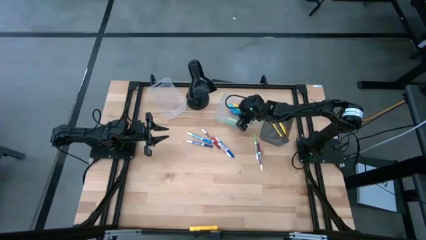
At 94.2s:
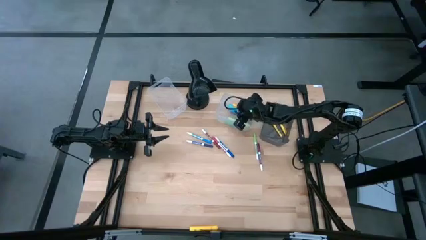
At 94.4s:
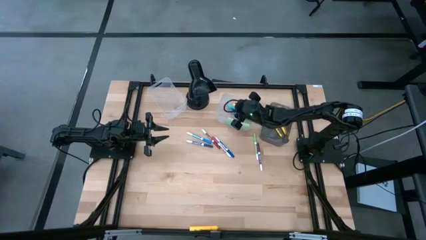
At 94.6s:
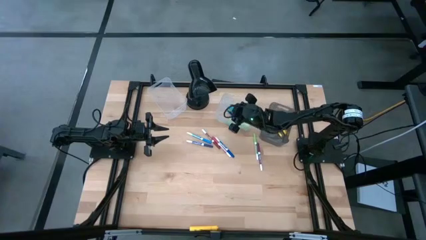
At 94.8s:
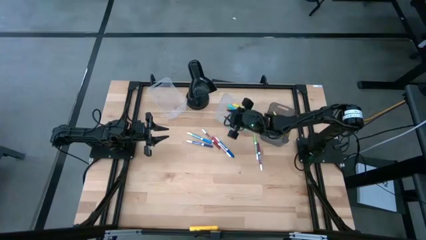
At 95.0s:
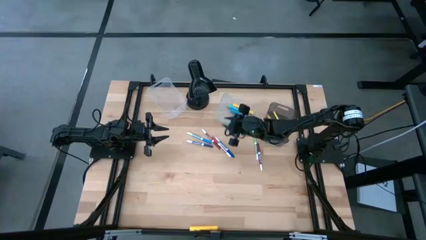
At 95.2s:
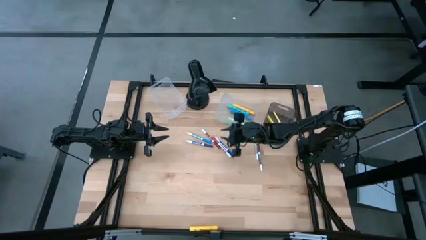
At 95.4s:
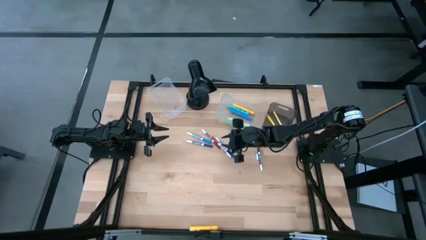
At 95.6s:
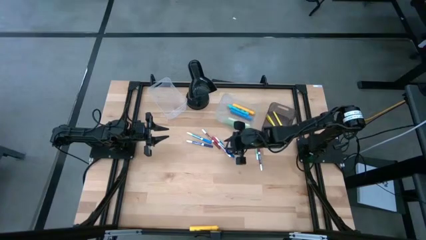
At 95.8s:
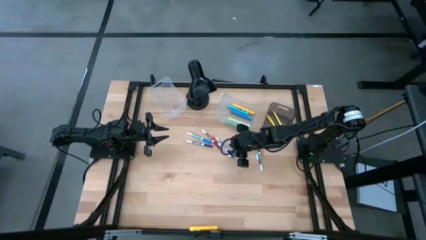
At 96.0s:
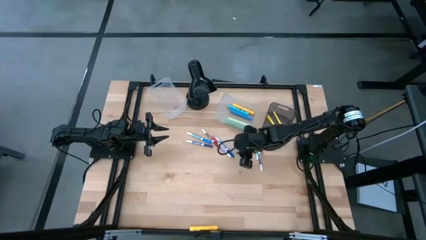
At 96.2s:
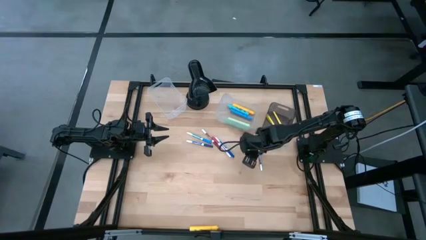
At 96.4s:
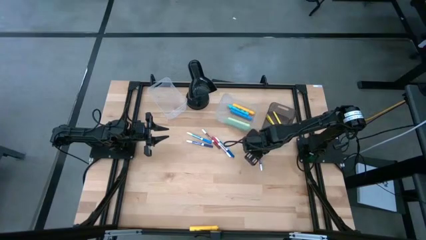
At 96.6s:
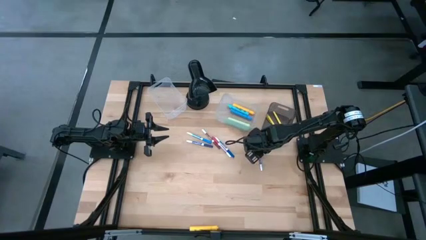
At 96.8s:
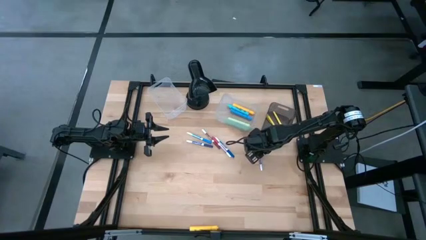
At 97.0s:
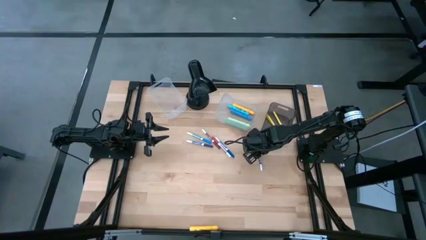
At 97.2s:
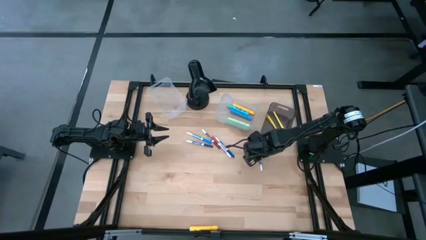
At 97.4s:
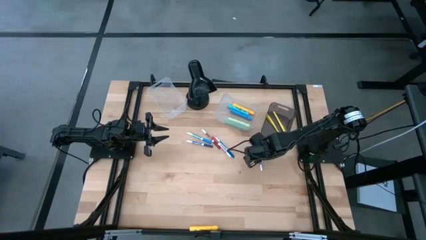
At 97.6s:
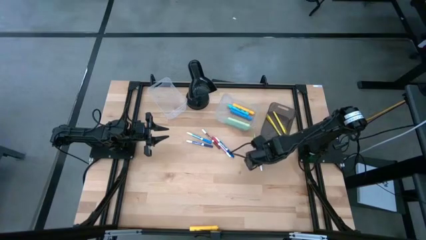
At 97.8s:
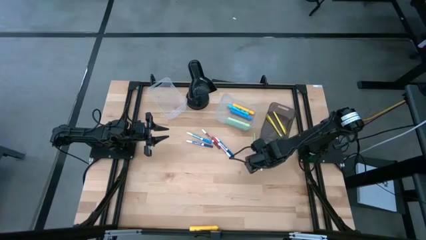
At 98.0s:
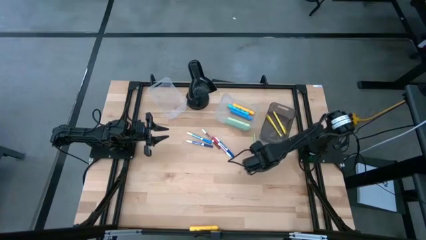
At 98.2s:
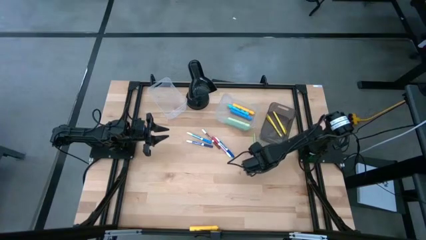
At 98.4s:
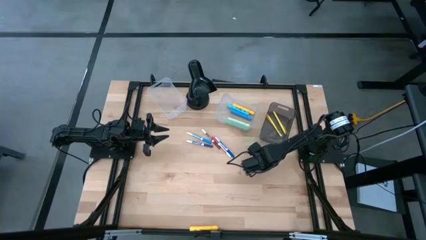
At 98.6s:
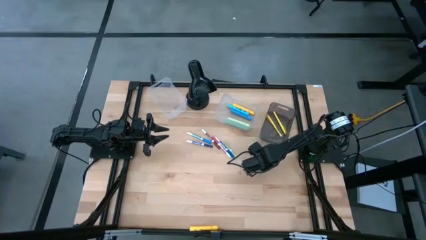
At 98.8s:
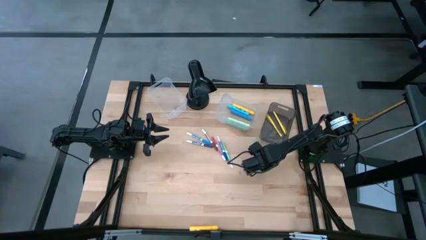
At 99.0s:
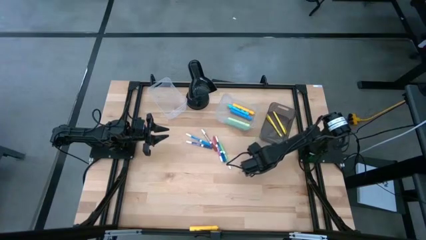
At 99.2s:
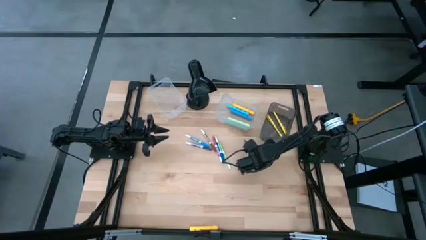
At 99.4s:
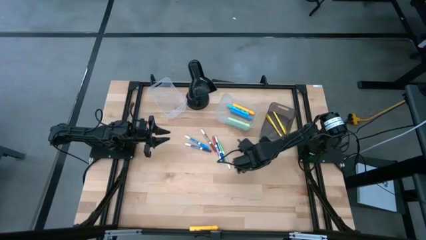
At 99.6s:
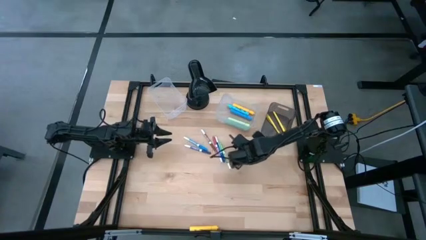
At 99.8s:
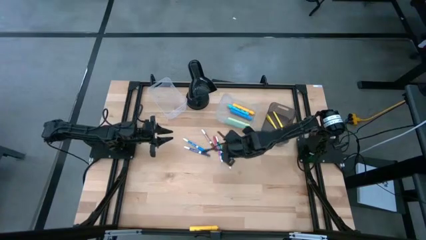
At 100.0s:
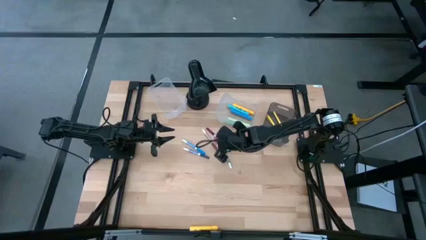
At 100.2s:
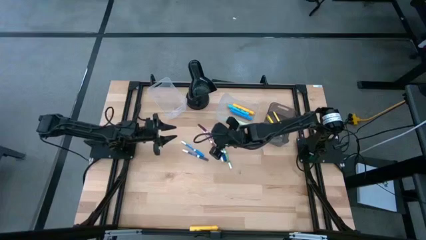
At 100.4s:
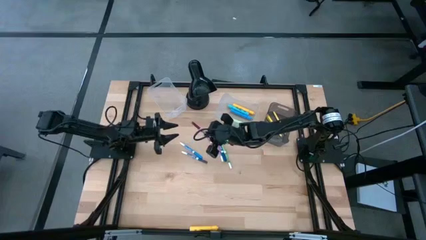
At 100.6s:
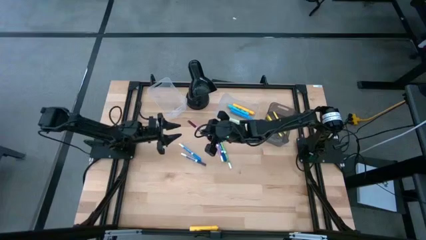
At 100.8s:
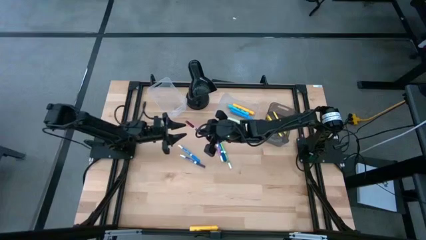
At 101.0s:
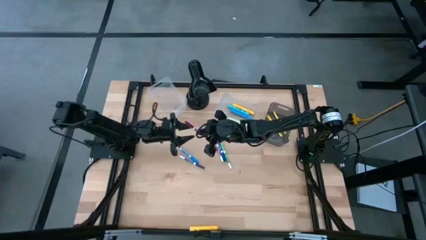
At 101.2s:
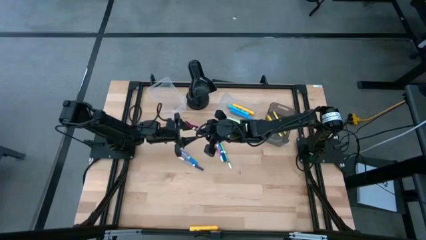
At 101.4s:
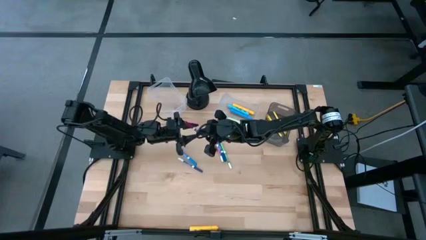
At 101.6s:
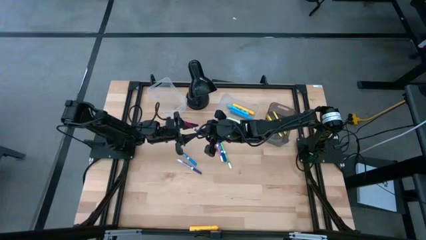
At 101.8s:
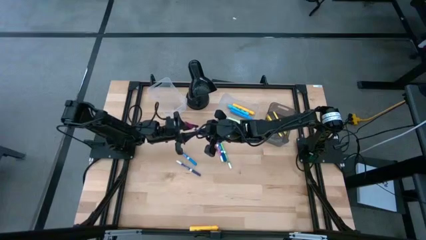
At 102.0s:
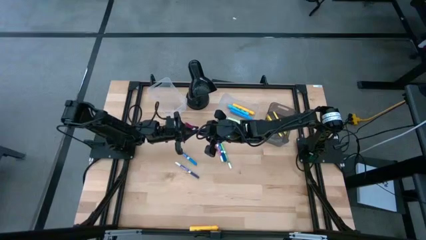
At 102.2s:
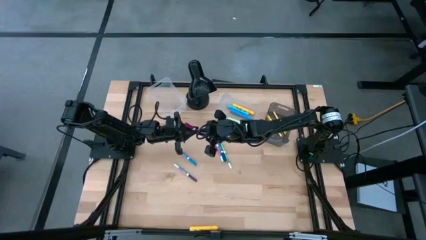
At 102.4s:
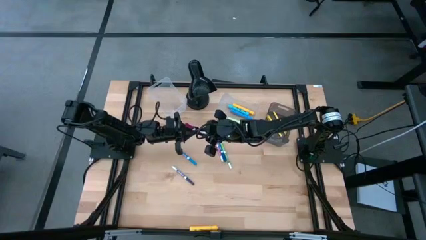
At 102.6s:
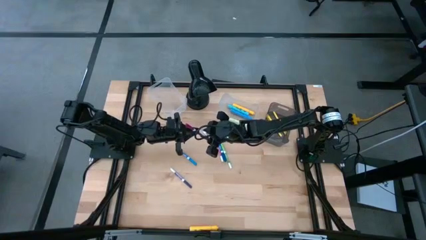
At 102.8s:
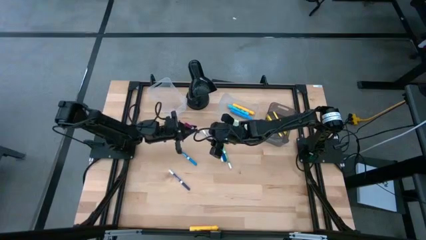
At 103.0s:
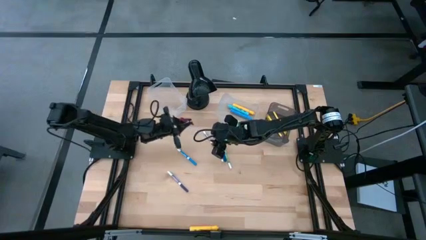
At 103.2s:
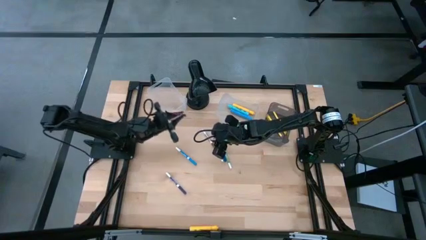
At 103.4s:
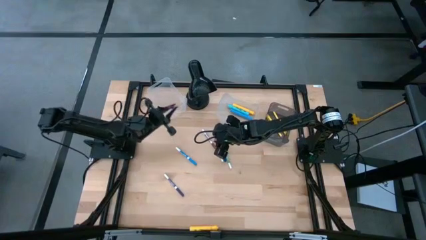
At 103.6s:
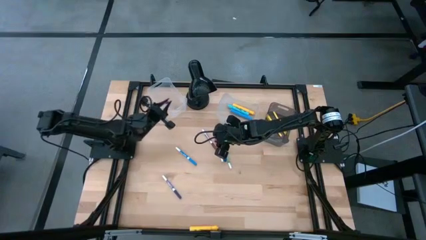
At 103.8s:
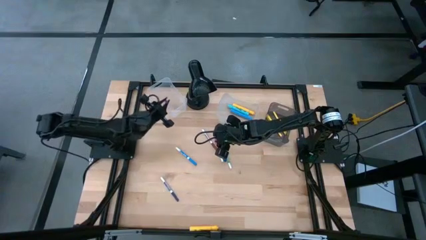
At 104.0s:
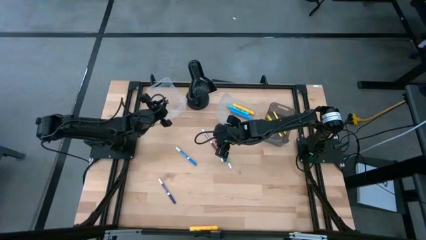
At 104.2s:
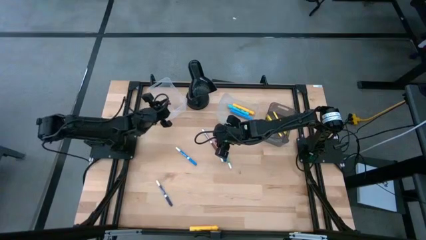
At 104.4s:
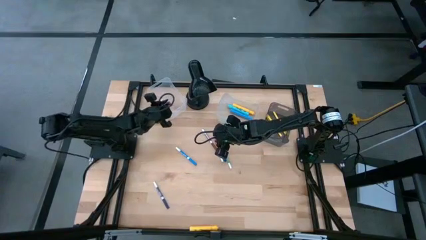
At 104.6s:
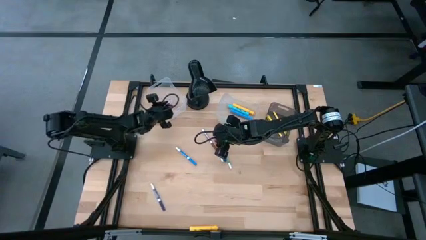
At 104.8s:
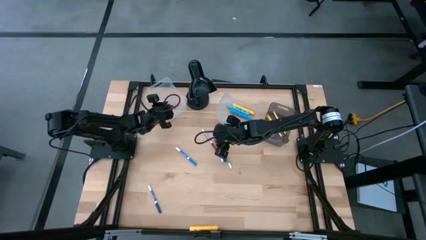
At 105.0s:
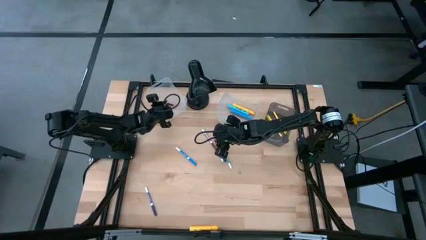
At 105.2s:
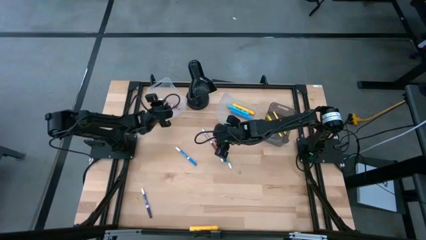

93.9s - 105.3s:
Task: Pick & Place Markers
Put the pink marker in the left transparent bin

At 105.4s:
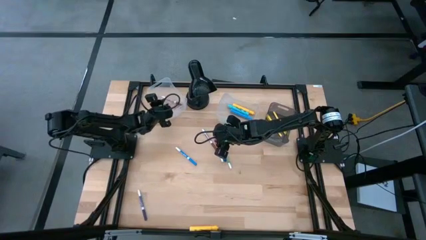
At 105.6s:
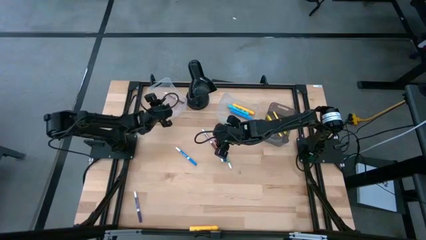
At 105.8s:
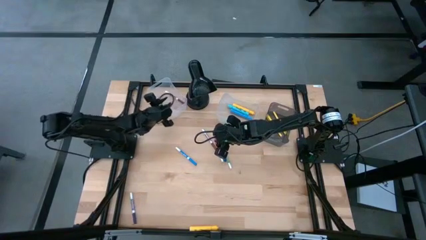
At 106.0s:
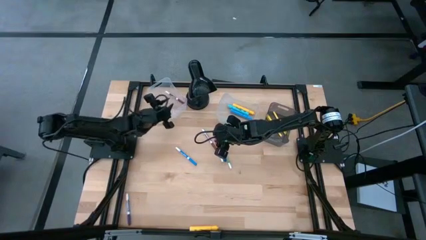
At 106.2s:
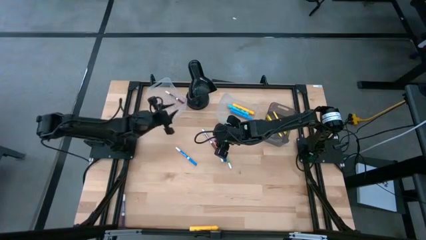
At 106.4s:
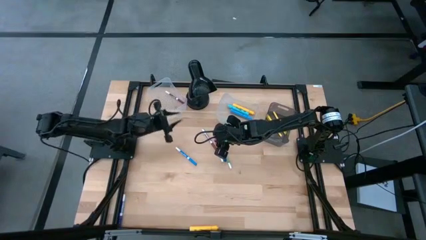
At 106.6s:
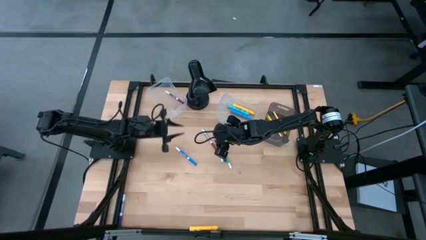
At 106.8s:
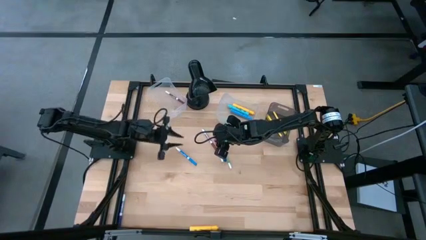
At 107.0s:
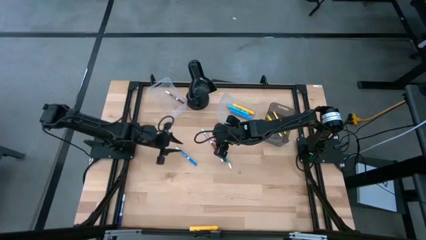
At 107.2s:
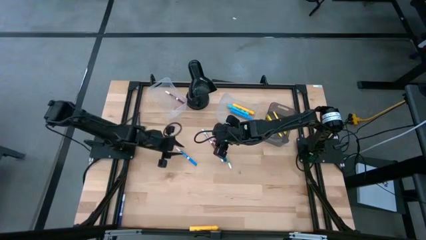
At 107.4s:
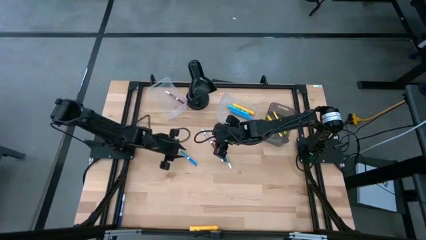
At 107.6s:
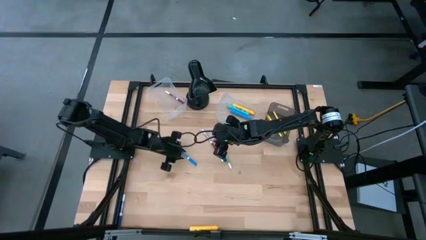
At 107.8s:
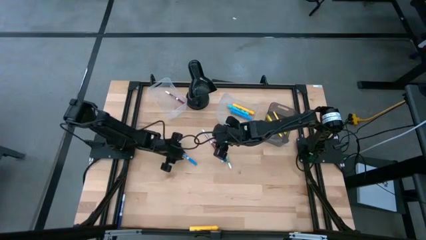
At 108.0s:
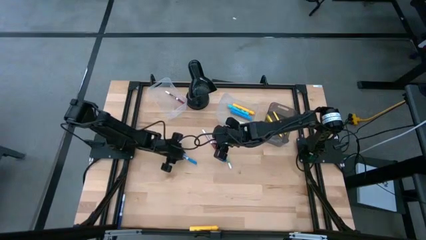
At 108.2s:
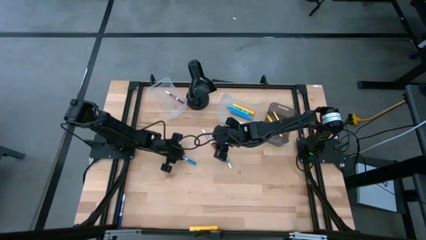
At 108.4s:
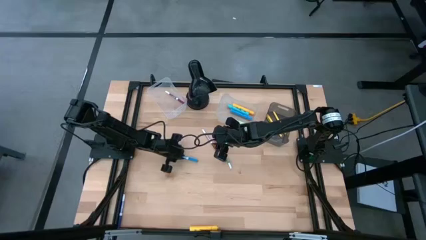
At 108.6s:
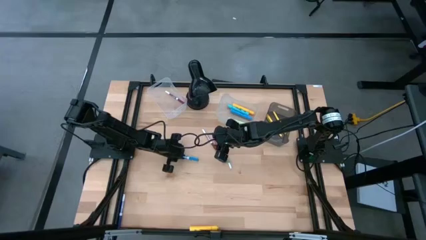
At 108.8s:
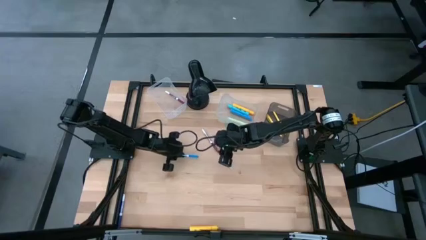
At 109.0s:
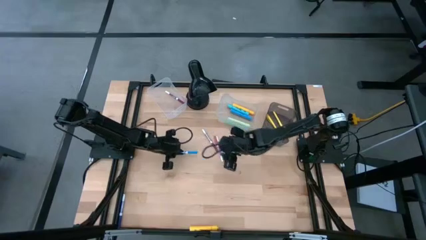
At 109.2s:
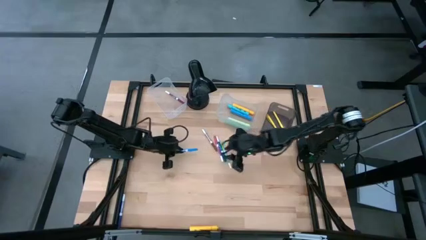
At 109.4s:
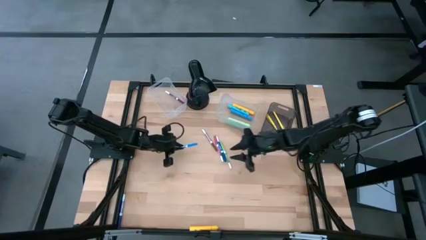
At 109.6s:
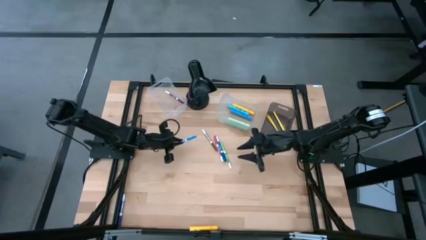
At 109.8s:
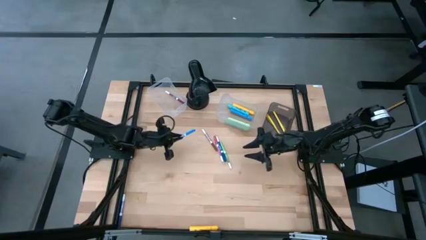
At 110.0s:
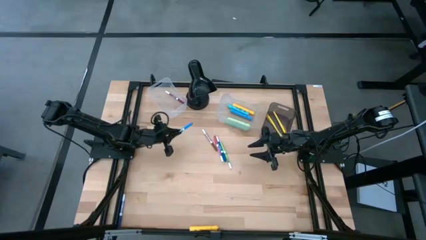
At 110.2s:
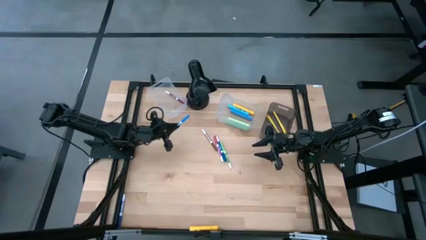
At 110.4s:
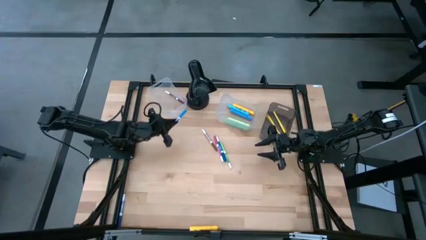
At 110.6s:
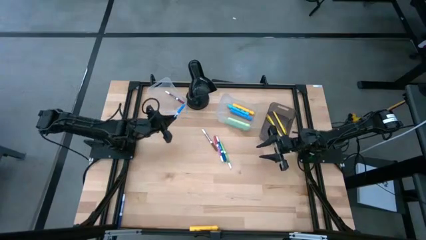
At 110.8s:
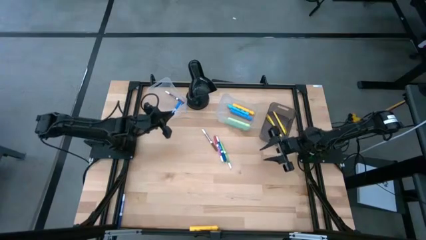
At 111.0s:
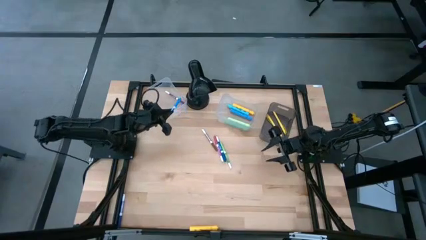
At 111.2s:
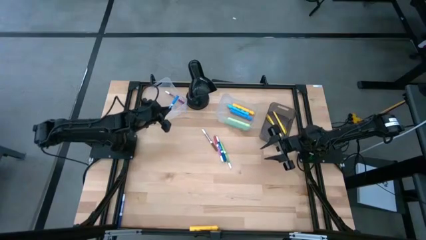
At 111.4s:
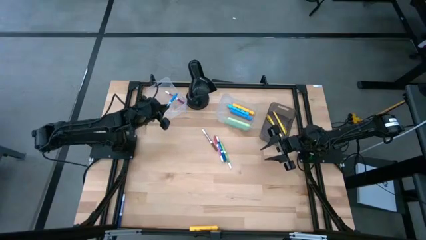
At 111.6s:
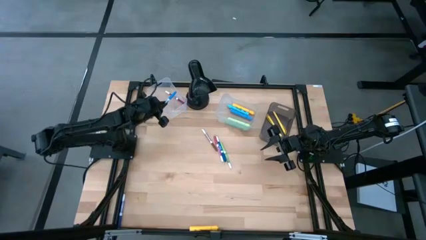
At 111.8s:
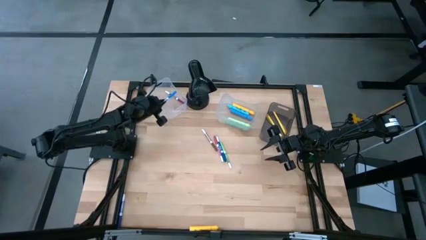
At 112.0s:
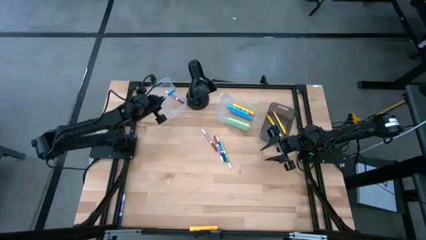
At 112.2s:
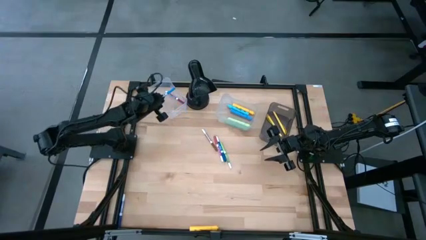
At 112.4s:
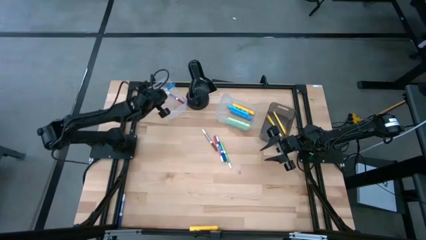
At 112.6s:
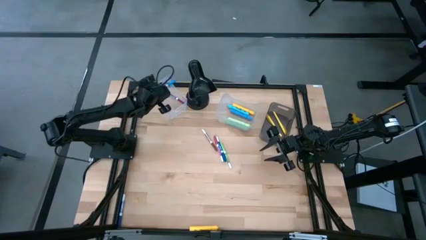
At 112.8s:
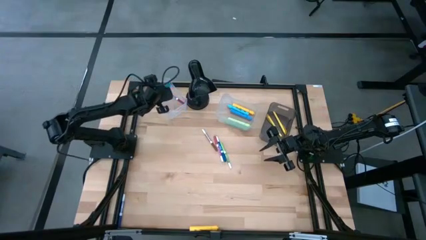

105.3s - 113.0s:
Put the light blue marker in the left transparent bin
